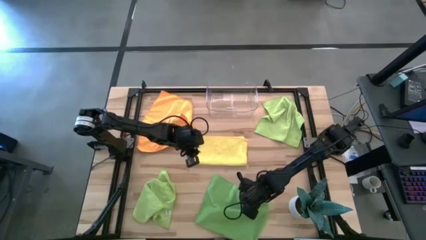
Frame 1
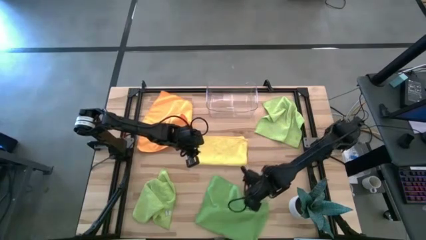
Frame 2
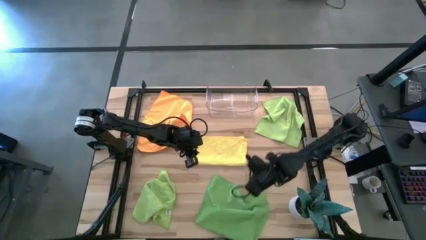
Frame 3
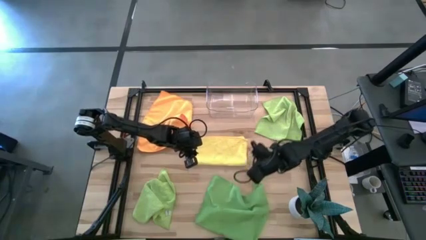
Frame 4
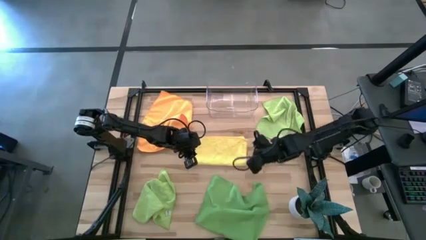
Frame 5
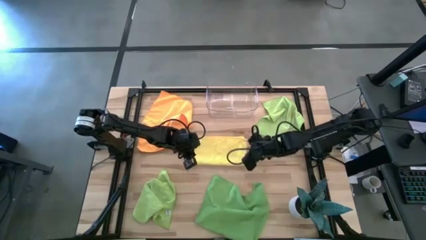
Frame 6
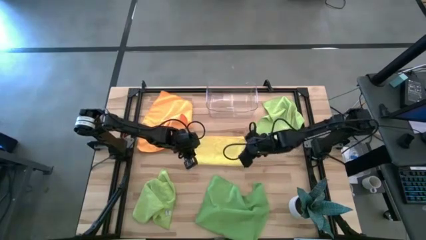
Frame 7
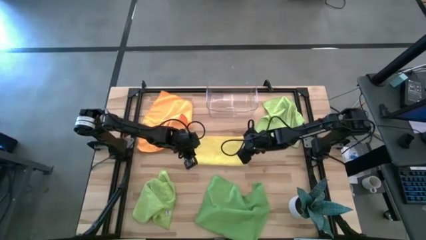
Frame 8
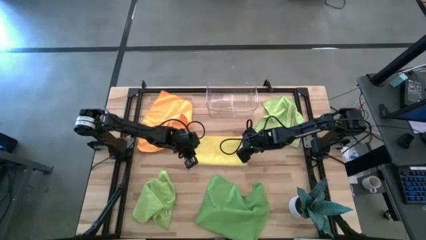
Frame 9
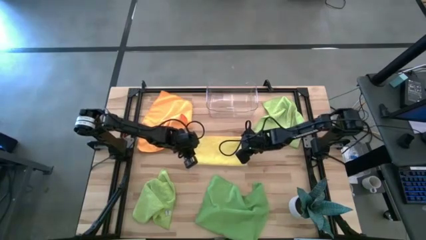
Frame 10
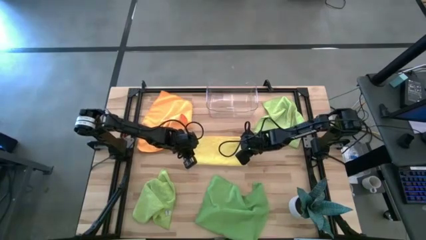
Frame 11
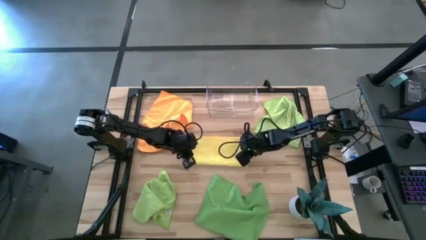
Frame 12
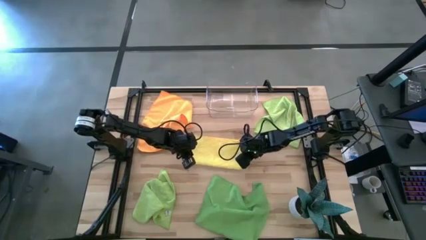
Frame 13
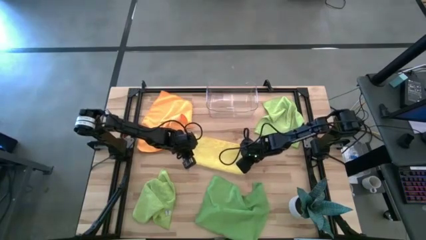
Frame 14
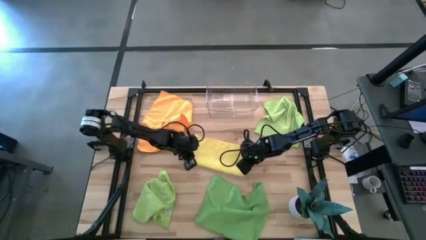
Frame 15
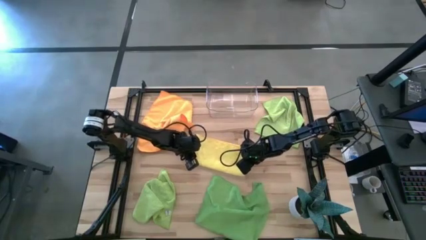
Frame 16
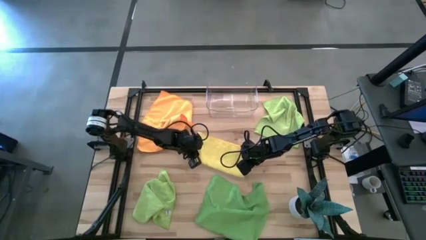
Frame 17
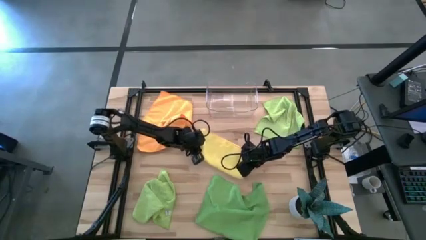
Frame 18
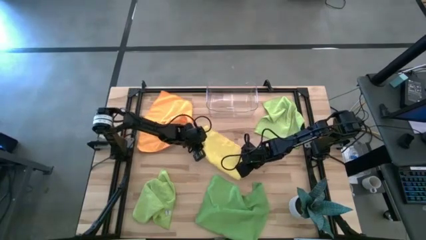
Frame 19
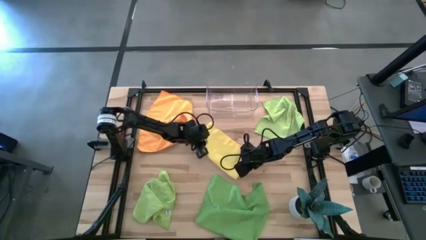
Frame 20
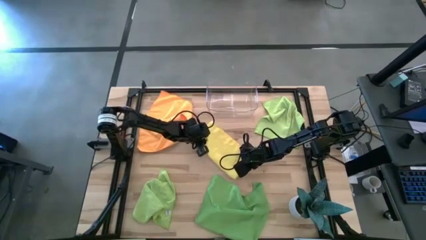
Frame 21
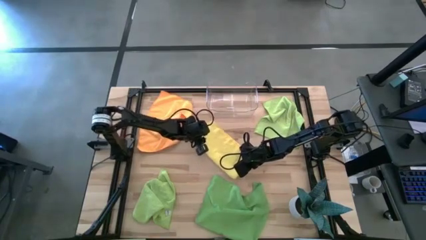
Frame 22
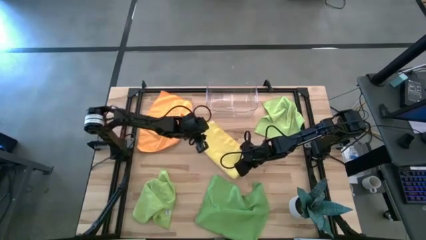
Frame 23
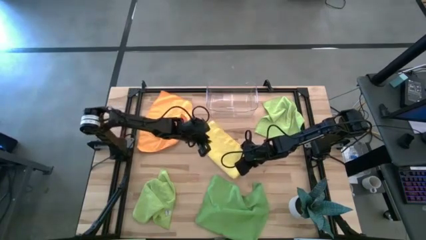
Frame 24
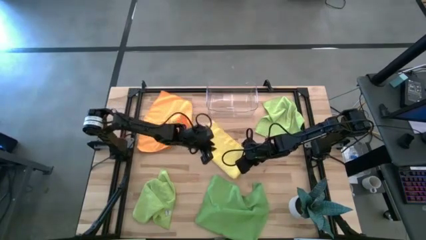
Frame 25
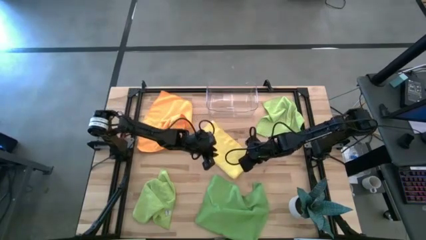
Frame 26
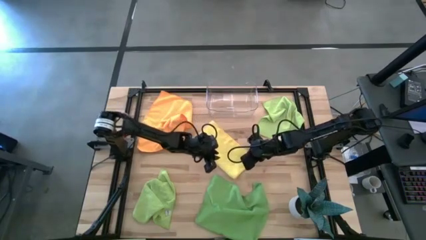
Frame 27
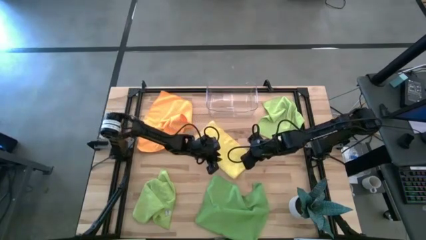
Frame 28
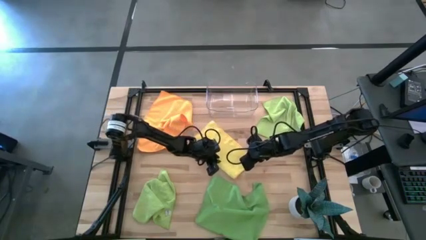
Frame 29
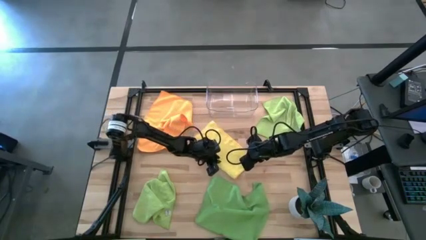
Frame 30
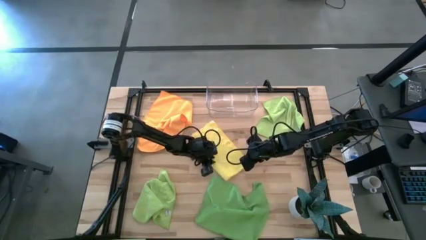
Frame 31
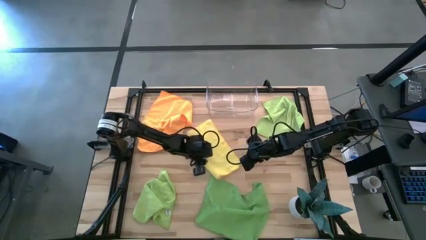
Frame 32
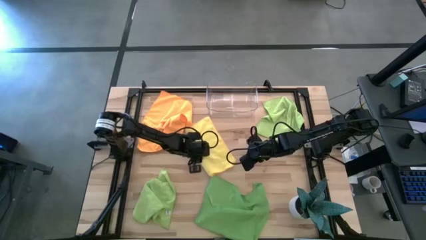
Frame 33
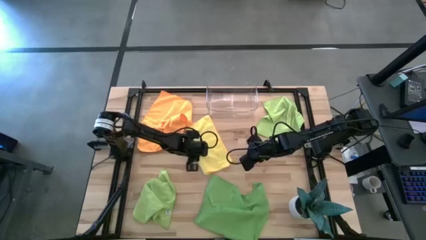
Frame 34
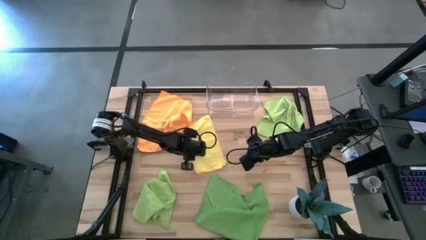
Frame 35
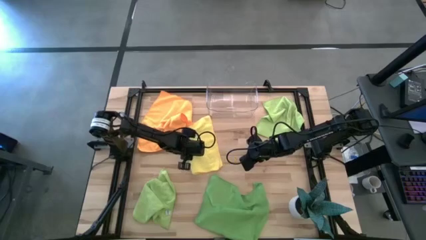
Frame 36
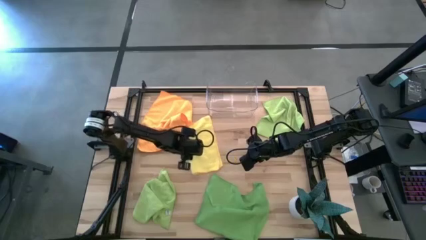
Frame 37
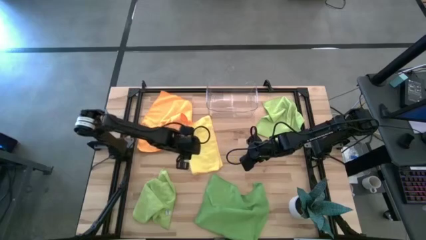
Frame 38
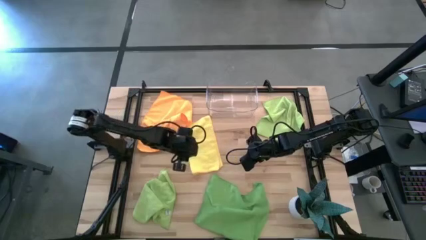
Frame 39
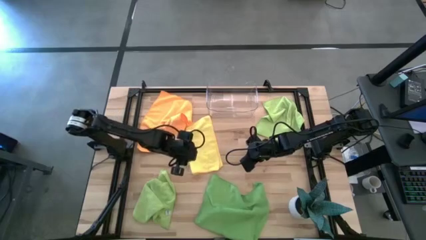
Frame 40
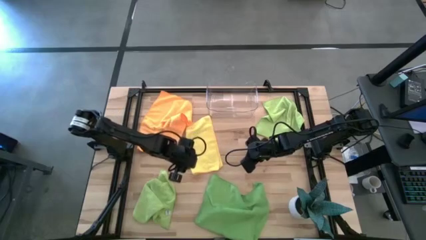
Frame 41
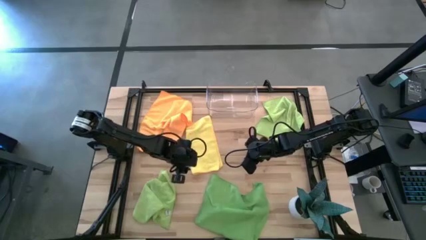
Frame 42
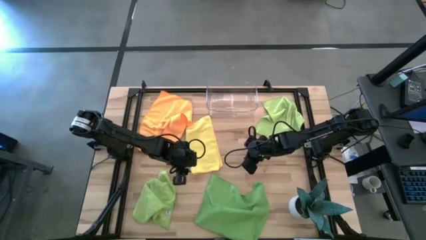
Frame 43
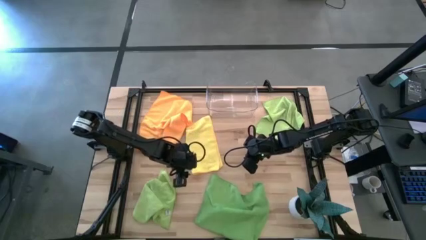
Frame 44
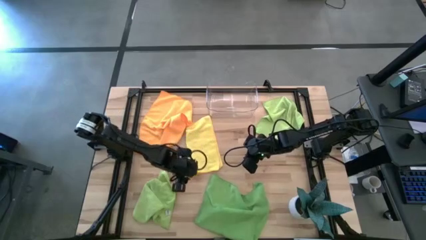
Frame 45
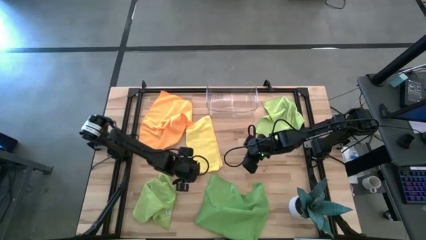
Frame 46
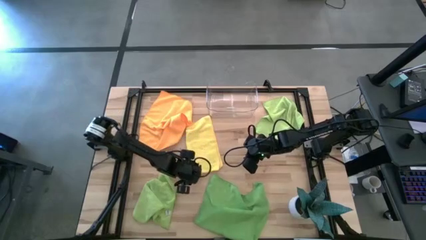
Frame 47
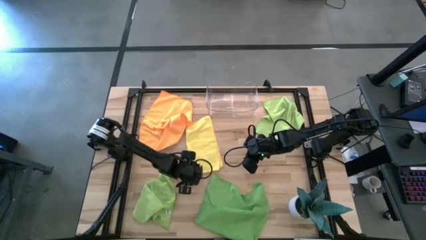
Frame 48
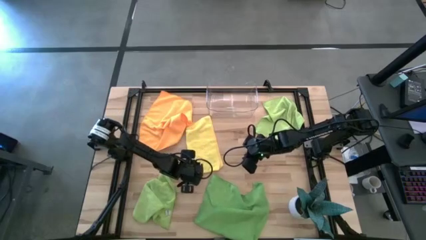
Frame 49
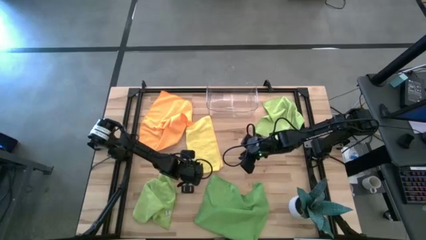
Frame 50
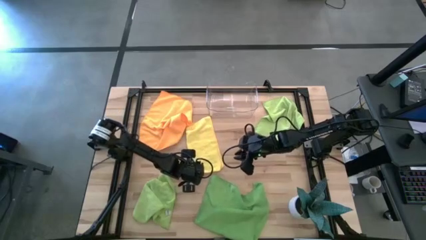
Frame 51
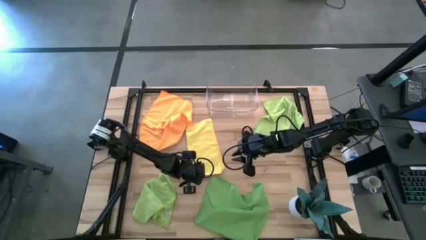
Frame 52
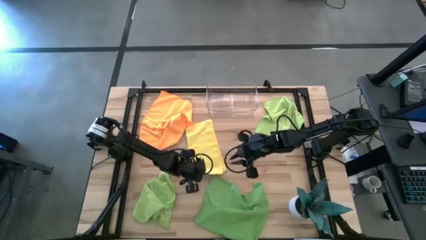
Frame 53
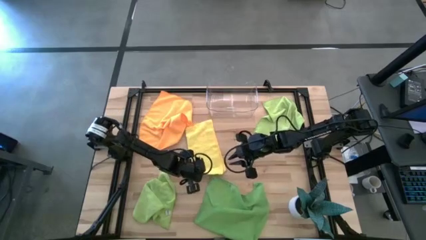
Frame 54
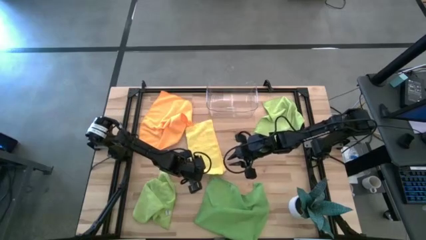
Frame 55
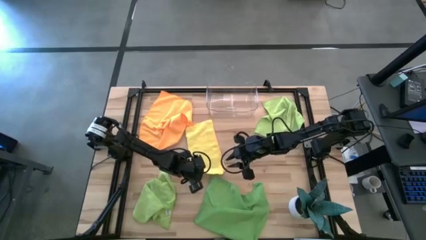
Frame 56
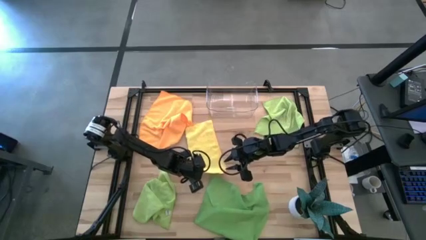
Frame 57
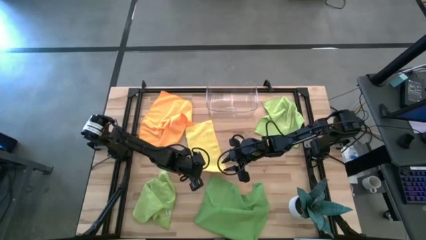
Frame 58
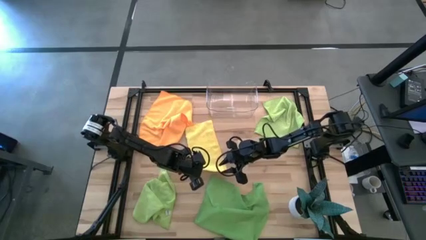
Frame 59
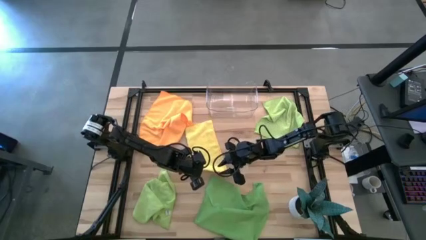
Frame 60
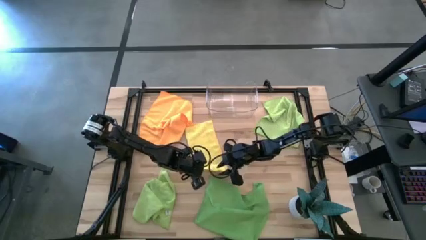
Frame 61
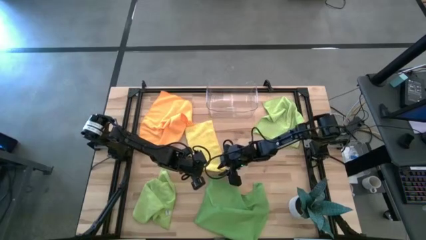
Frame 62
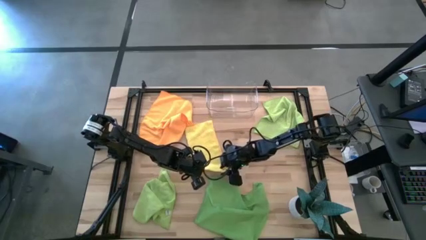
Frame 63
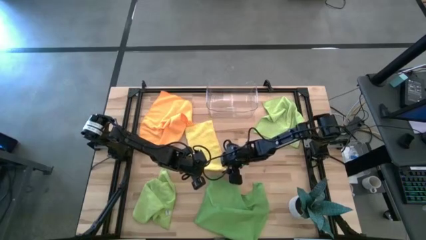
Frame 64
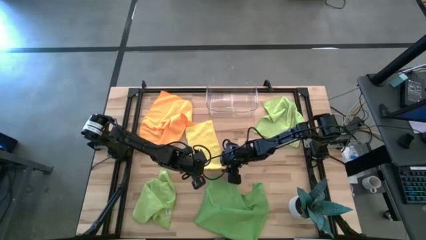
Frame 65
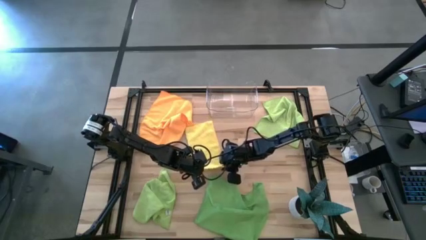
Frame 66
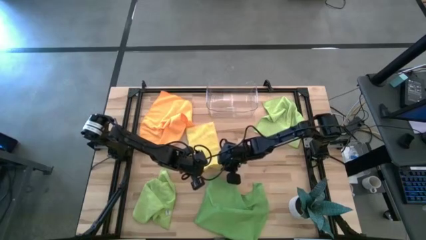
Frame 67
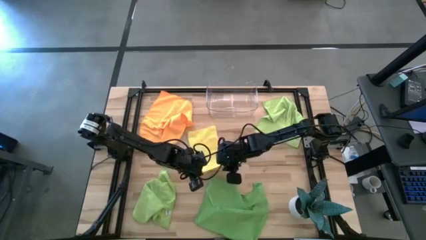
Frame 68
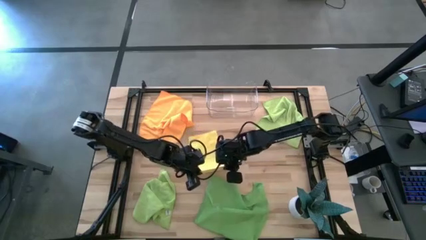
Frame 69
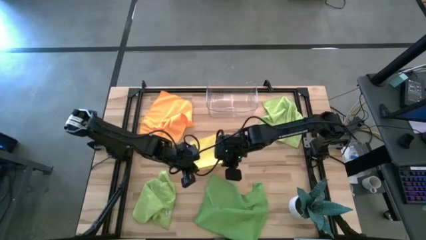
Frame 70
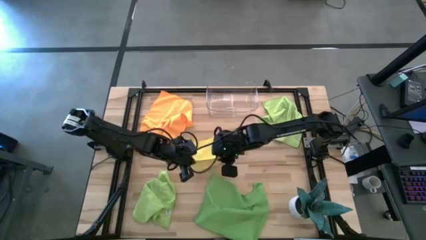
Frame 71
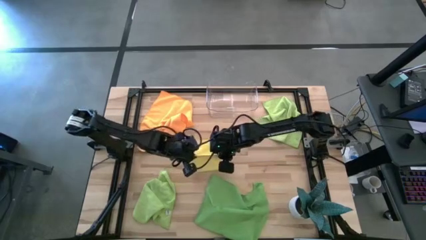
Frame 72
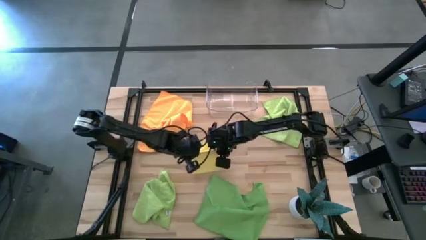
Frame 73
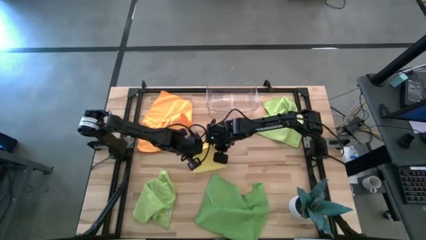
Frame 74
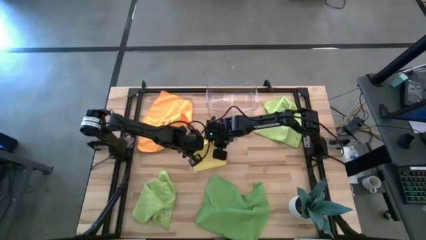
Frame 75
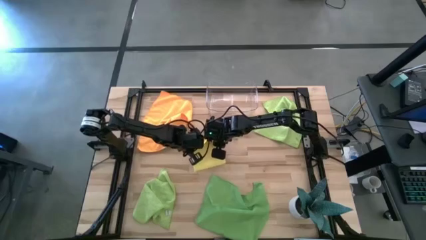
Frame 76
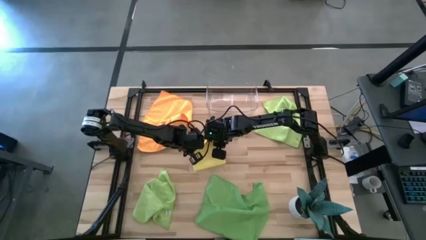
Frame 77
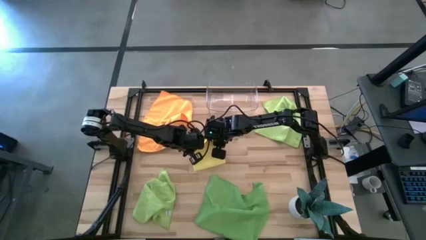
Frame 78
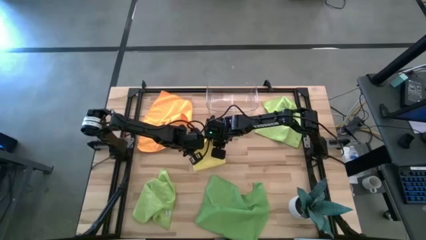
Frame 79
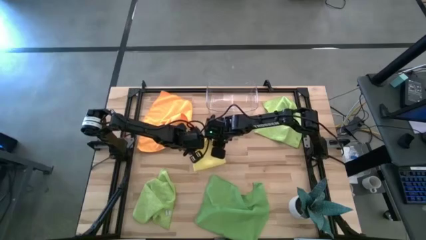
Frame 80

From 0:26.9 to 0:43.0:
Task: Fold microfiber towels
Fold the yellow microfiber cloth
